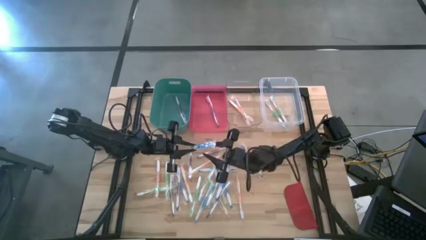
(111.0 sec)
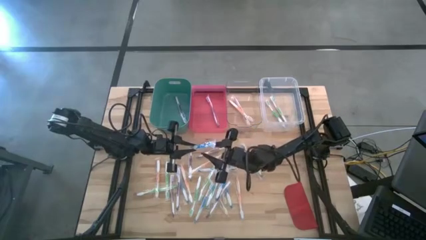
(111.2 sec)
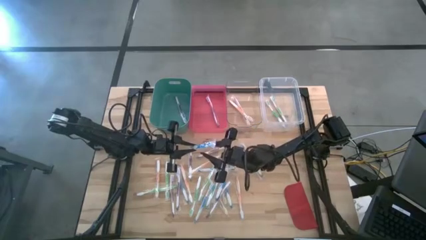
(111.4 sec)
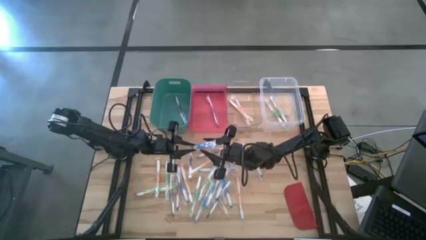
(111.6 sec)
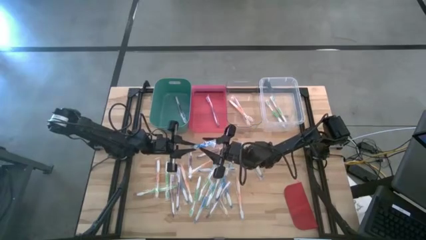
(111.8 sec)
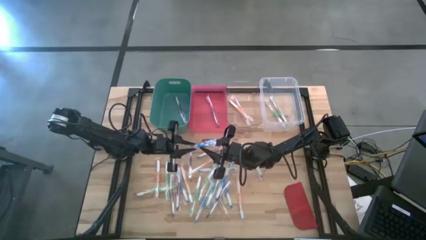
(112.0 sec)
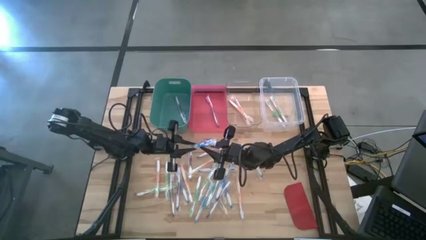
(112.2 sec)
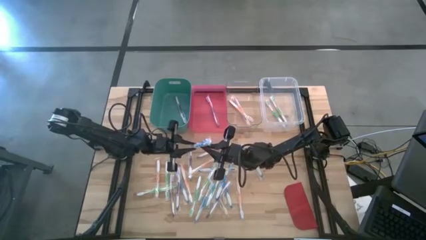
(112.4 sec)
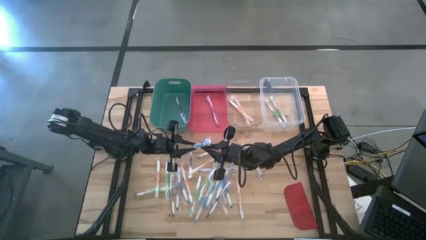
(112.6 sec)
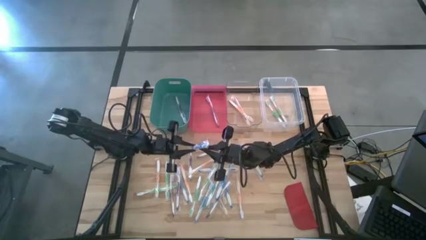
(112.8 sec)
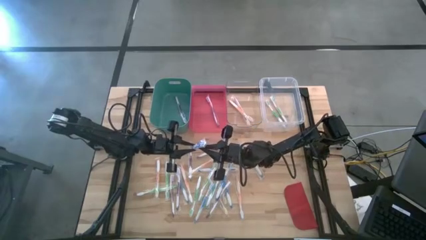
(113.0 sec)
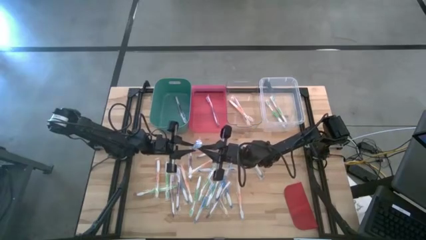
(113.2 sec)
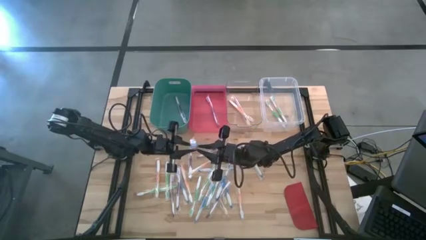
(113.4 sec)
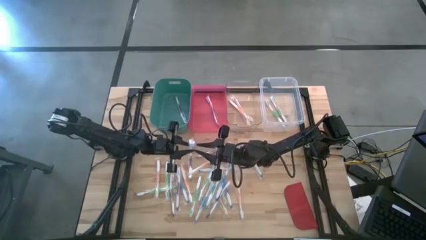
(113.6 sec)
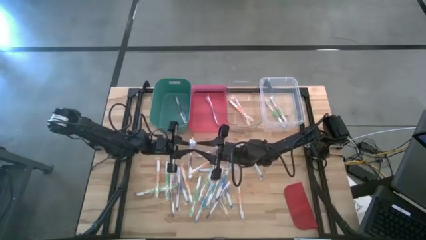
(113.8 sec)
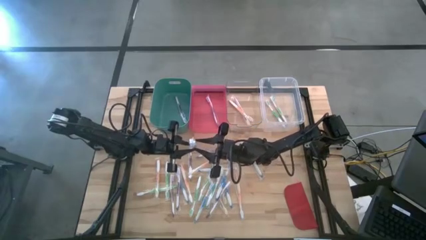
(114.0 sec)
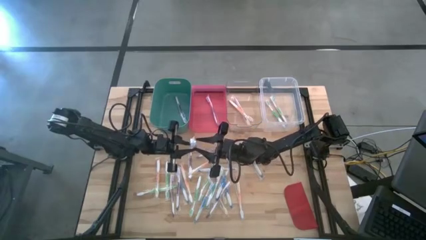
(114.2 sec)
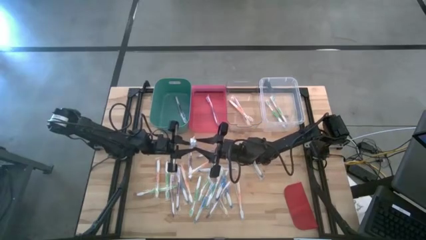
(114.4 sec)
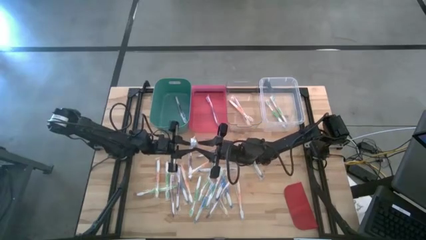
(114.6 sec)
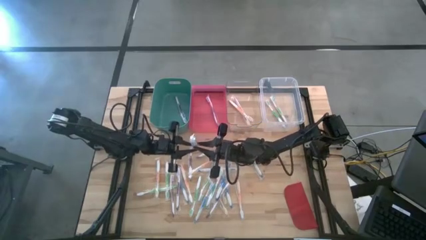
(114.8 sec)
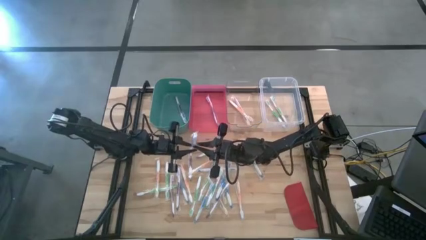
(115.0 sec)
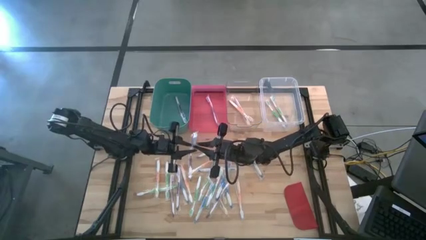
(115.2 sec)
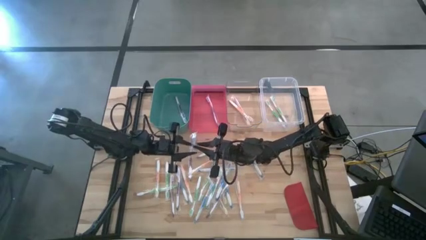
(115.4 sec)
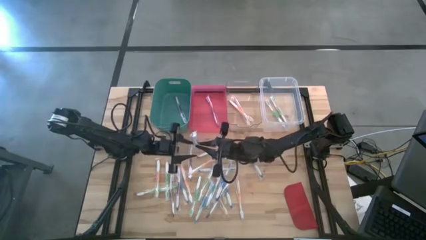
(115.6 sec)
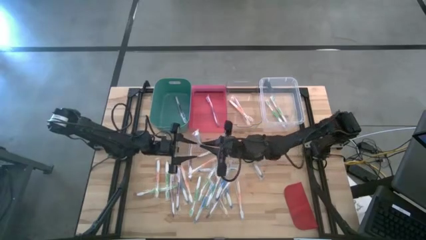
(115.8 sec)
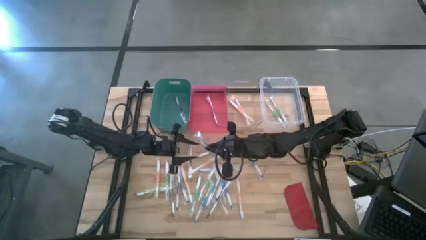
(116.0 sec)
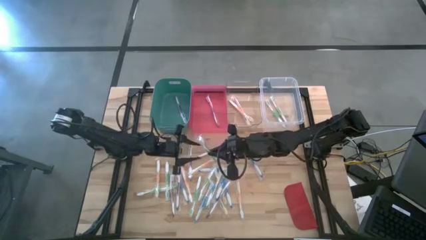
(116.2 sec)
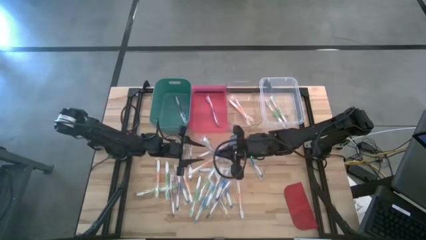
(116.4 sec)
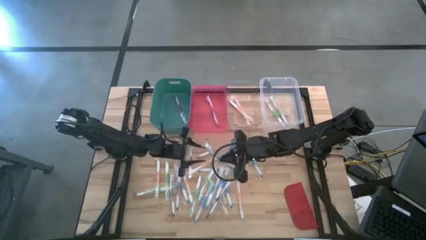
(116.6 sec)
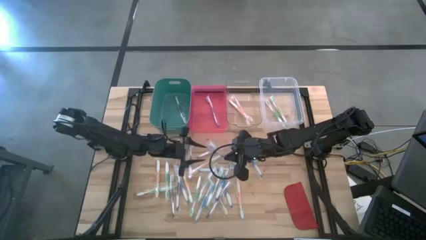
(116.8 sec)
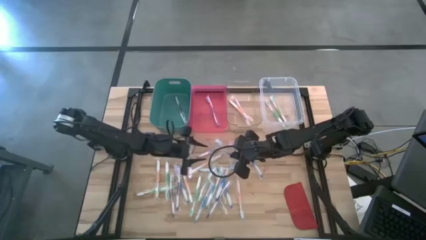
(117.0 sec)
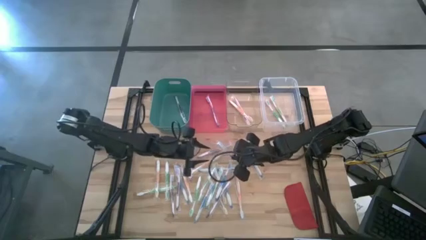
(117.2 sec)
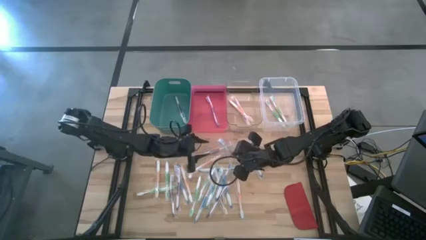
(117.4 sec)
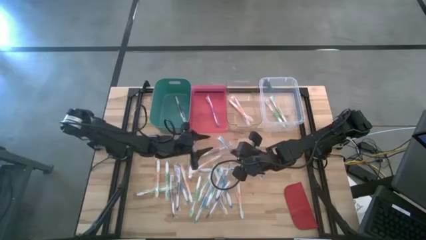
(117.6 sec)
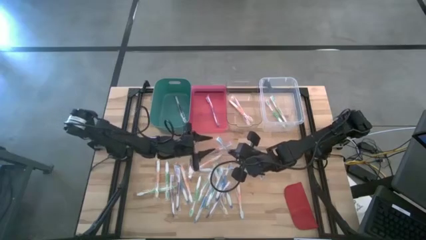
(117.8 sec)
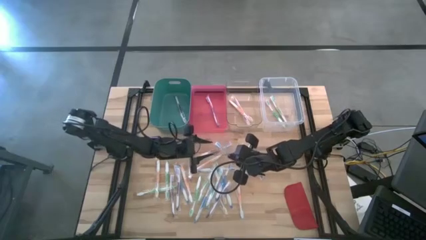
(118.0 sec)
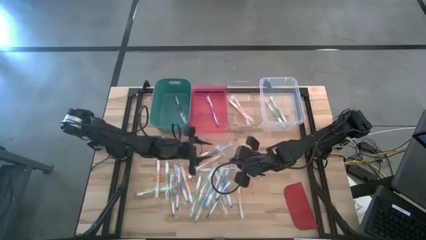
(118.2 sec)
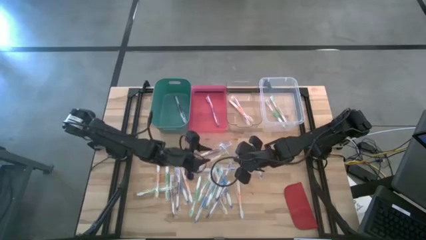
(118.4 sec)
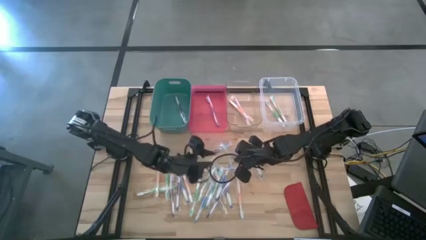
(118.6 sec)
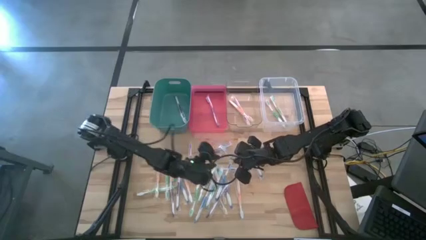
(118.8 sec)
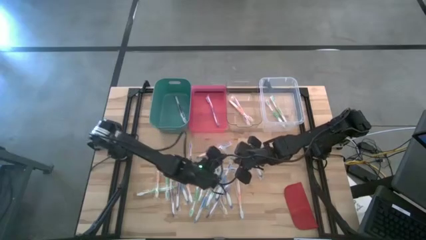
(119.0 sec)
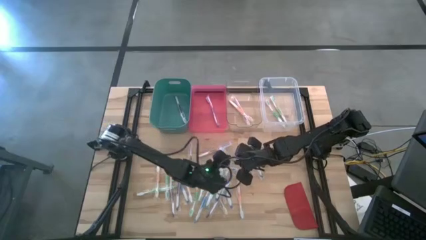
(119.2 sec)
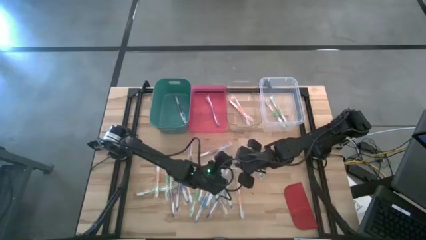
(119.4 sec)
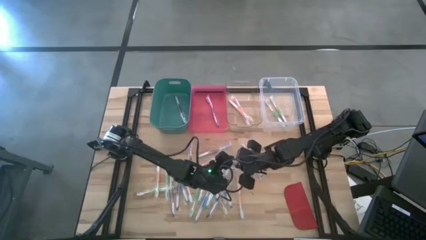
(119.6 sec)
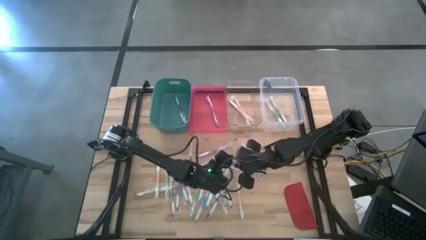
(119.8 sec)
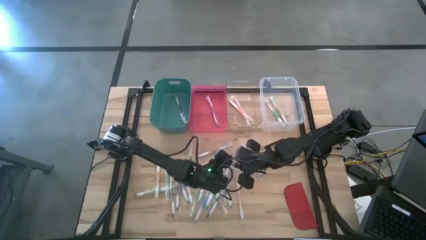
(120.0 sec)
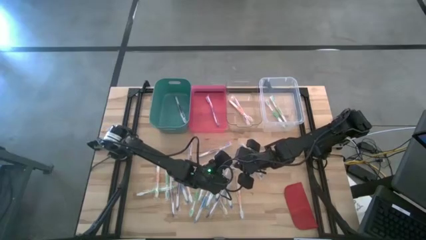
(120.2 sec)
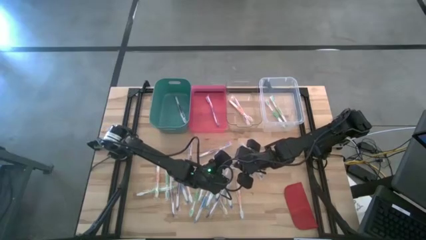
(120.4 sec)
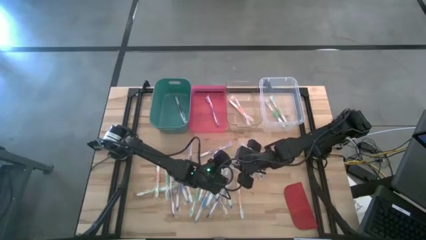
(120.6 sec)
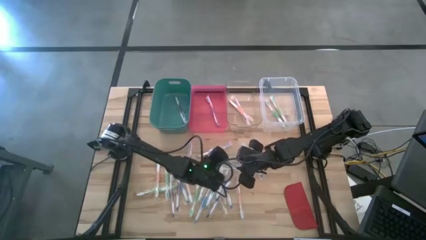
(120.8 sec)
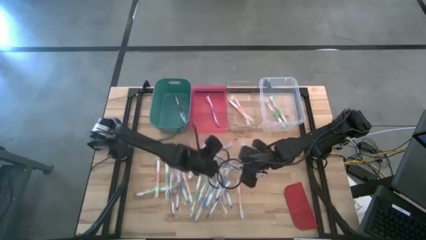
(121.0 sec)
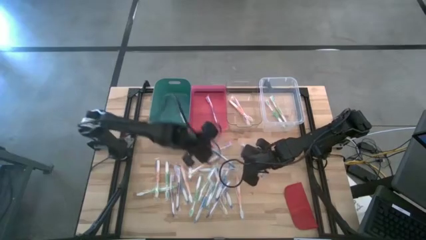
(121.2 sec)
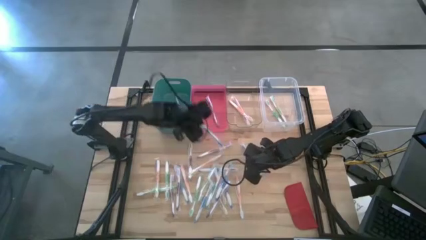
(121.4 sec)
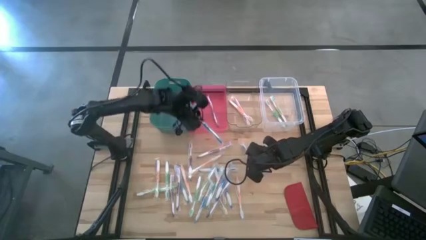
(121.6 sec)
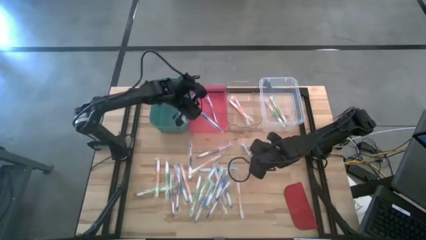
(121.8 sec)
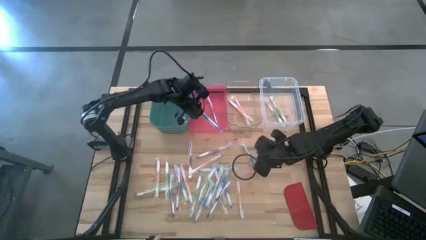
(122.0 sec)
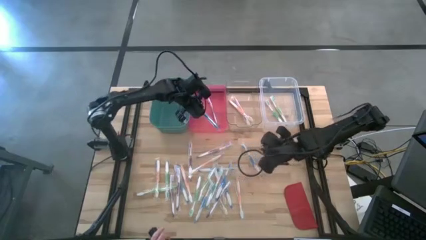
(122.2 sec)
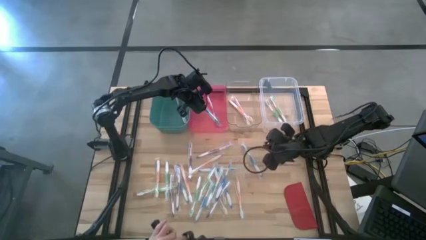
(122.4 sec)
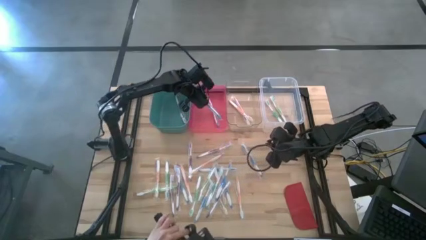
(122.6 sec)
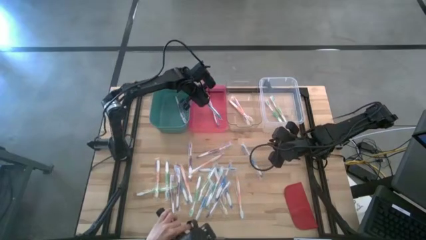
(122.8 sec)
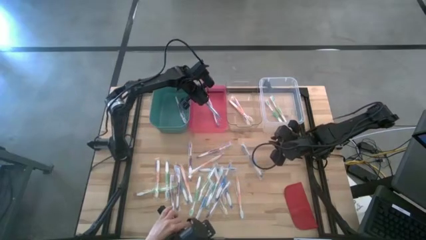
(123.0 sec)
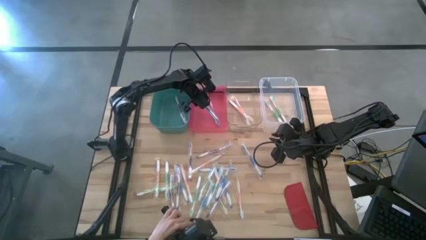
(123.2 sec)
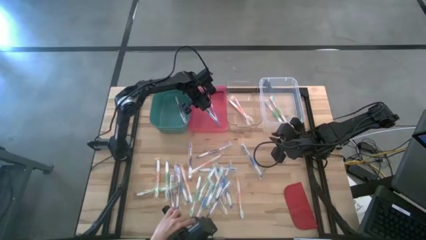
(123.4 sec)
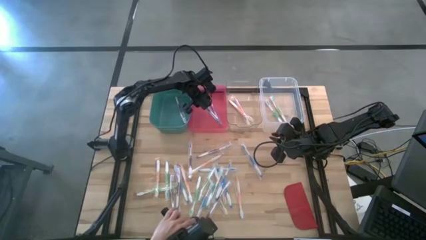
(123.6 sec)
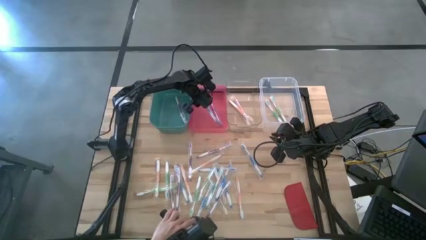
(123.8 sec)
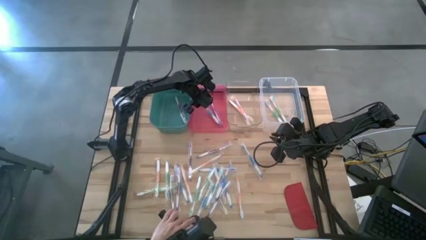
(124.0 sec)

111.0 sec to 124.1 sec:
Task: Pick & Place Toothbrushes
Put the blue toothbrush into the red bin

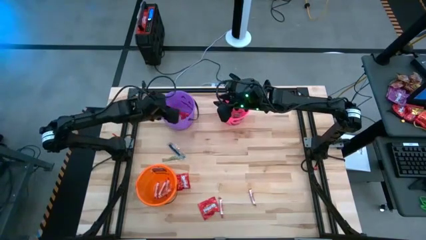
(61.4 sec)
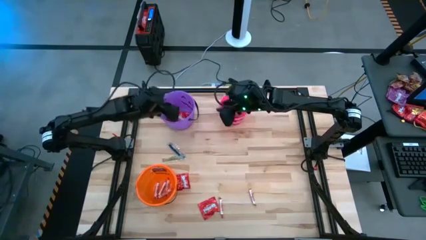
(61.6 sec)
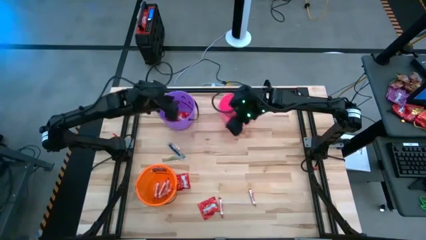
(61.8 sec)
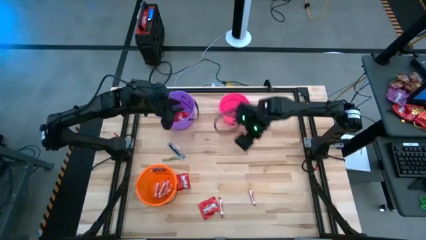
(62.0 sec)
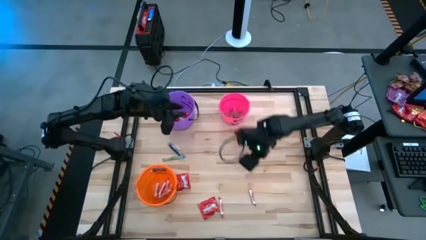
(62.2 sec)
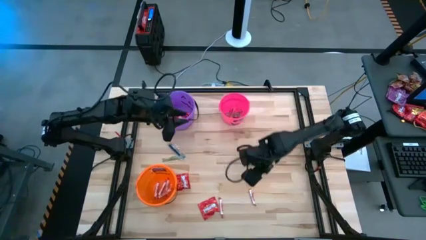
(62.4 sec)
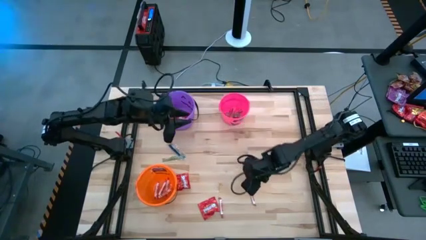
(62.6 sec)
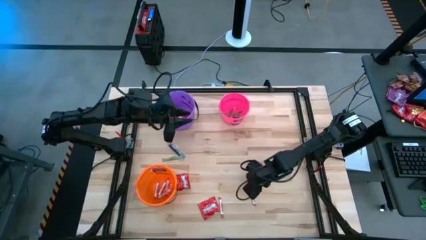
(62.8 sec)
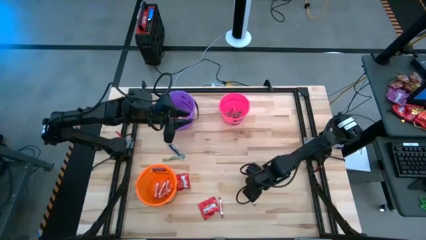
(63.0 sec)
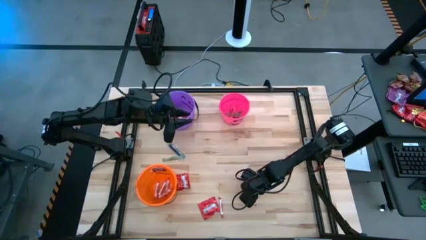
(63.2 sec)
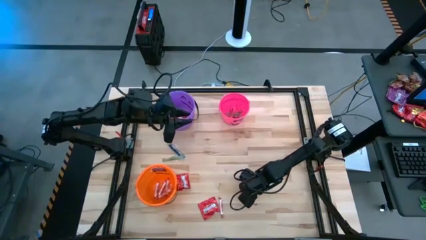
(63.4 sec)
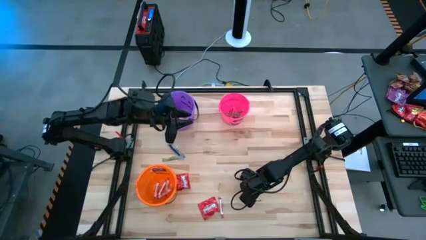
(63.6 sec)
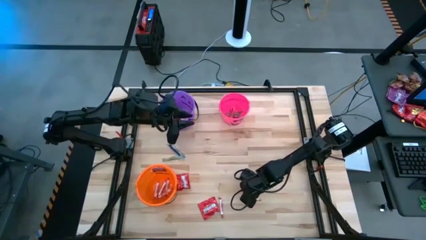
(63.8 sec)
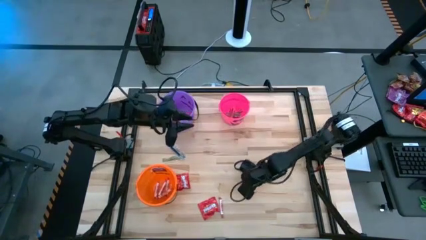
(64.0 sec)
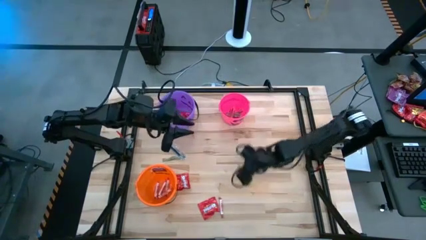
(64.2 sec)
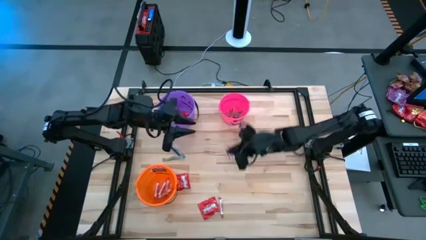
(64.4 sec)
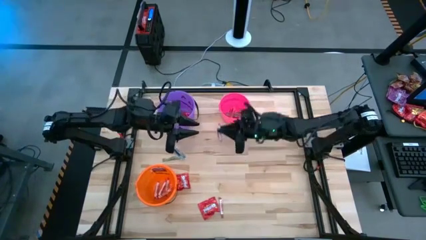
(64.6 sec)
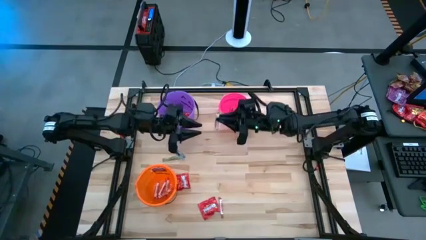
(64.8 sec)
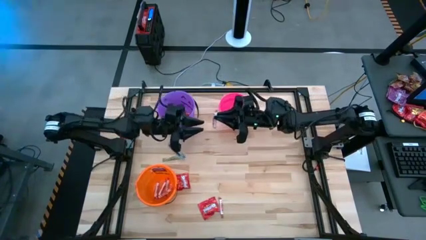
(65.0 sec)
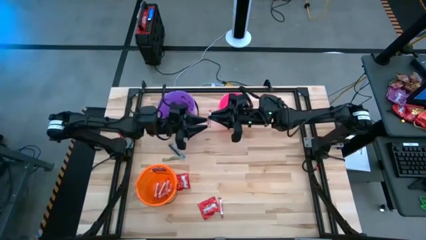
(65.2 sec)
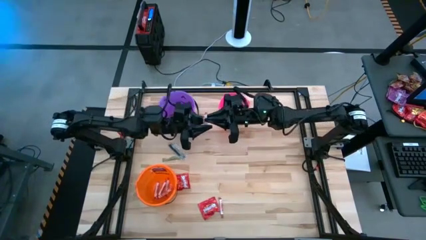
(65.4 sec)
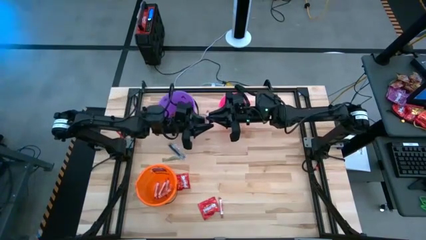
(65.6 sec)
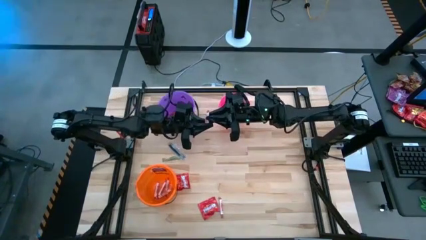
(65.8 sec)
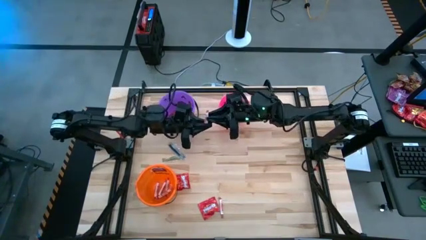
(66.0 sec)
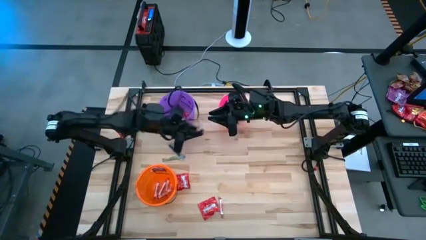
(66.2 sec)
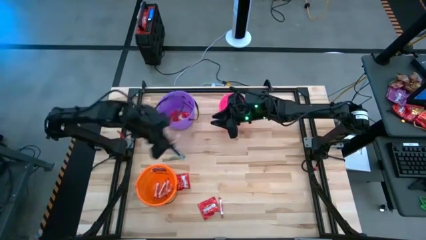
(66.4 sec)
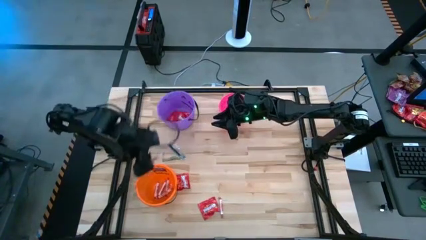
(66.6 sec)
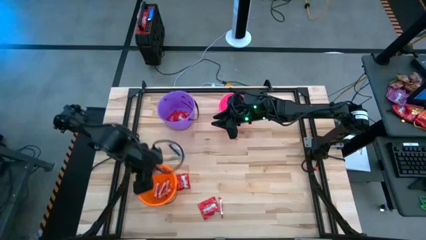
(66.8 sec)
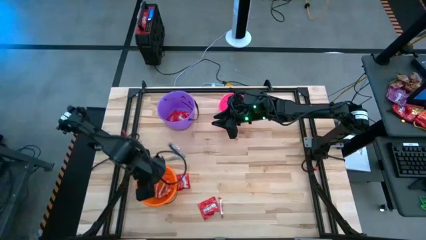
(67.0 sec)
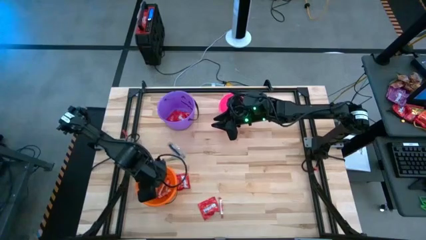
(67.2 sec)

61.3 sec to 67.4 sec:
Task: Sort candy by brand, put in halloween buckets
Put the white candy into the orange bucket
